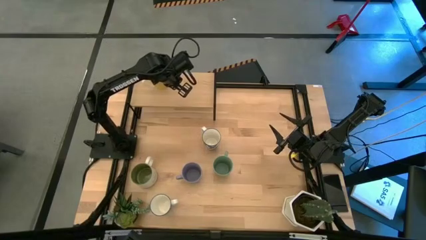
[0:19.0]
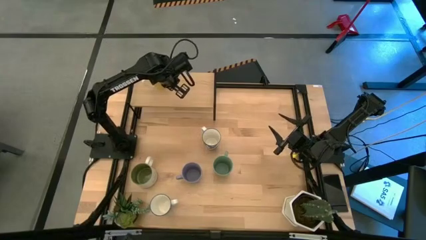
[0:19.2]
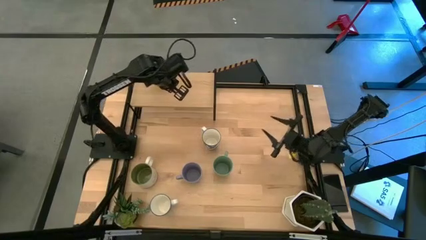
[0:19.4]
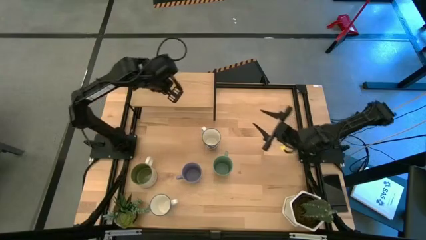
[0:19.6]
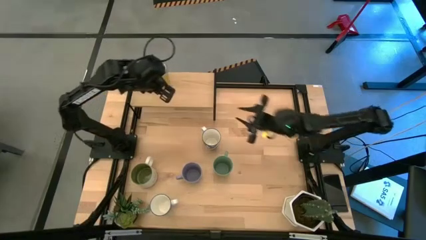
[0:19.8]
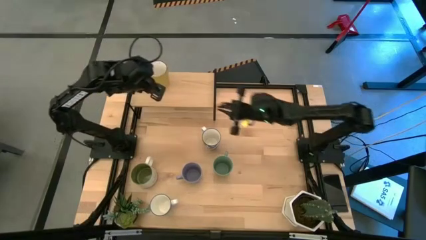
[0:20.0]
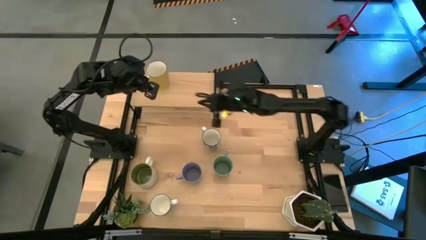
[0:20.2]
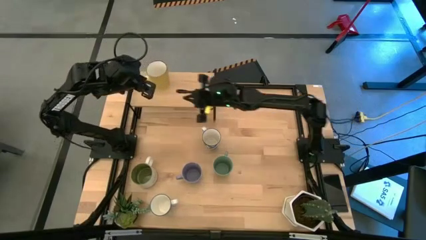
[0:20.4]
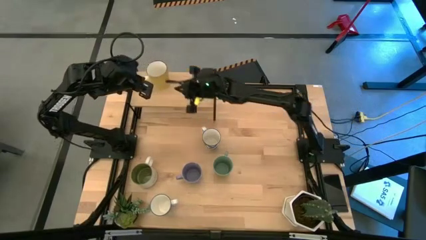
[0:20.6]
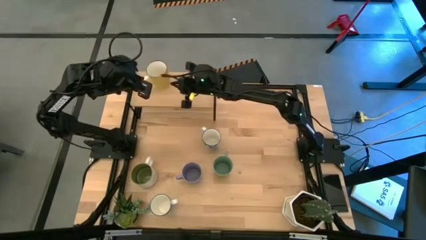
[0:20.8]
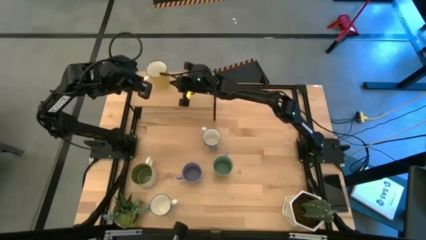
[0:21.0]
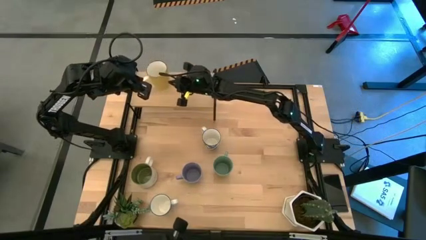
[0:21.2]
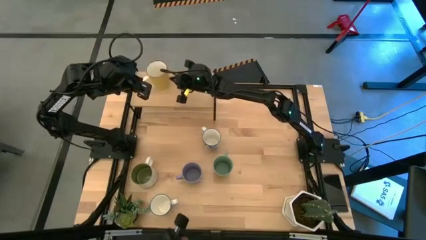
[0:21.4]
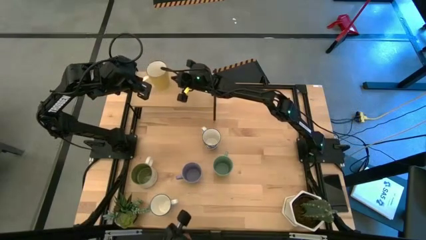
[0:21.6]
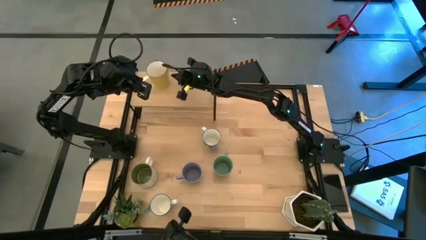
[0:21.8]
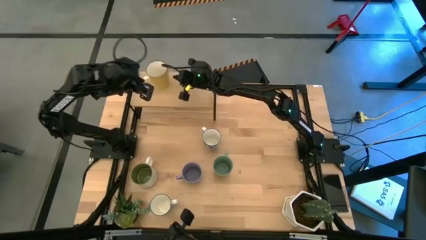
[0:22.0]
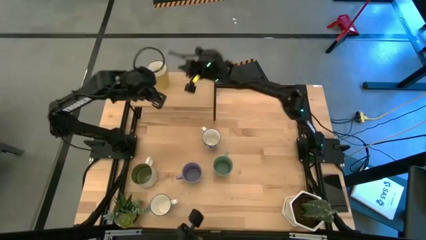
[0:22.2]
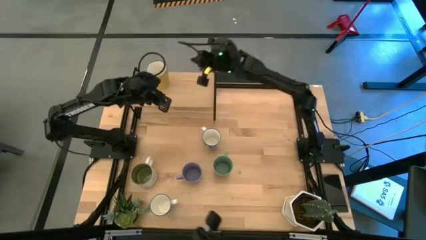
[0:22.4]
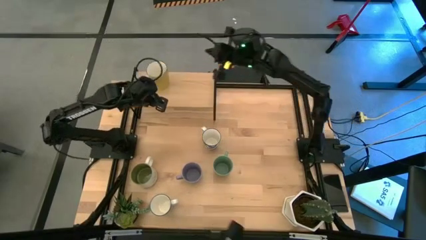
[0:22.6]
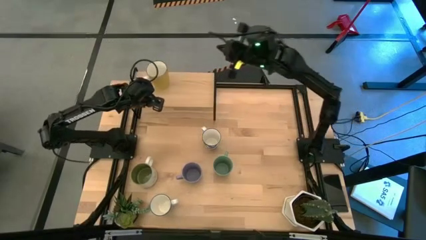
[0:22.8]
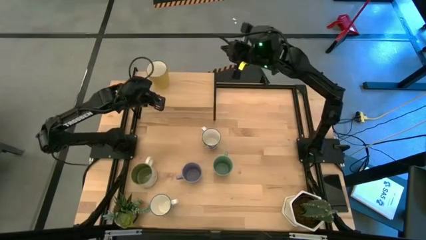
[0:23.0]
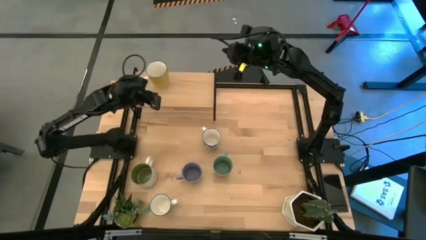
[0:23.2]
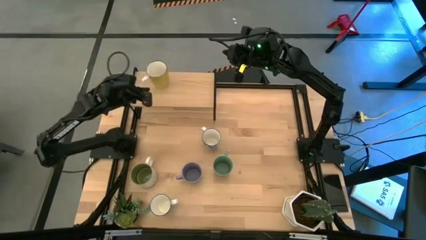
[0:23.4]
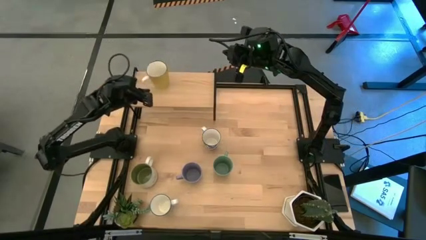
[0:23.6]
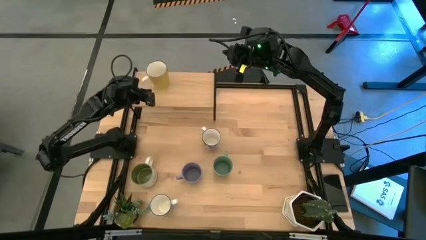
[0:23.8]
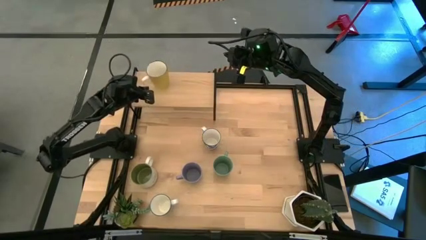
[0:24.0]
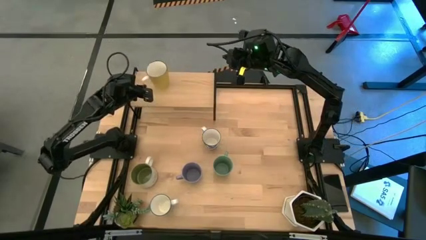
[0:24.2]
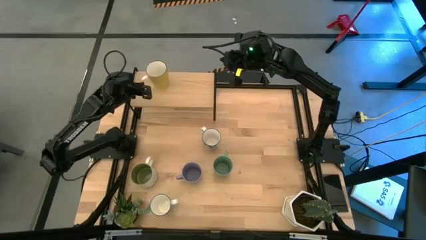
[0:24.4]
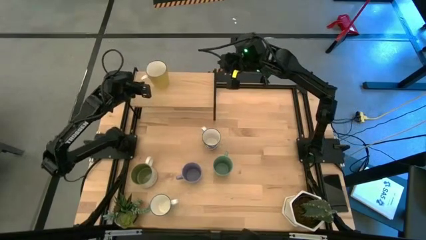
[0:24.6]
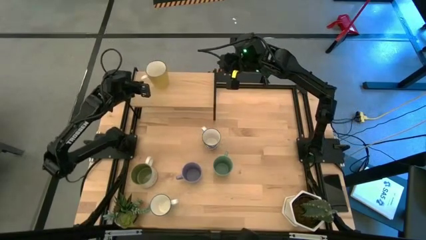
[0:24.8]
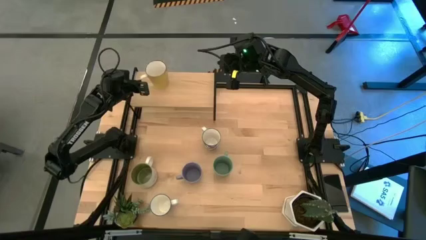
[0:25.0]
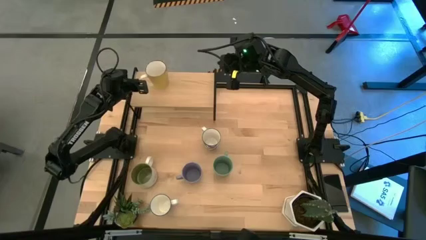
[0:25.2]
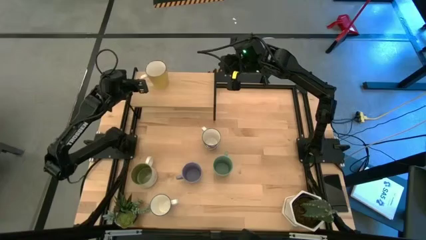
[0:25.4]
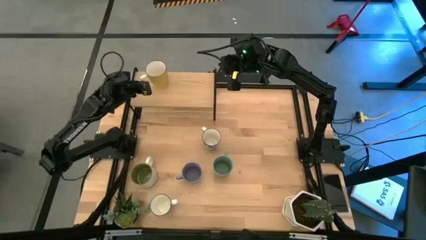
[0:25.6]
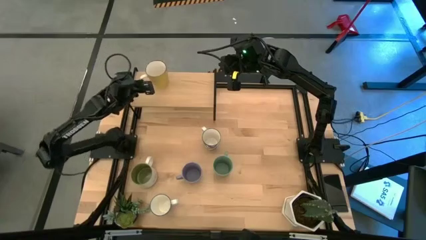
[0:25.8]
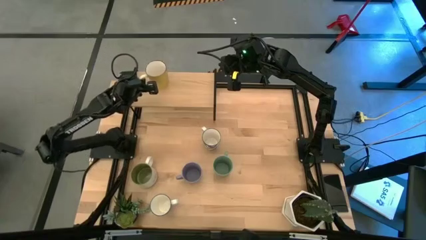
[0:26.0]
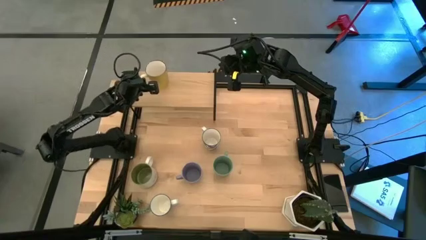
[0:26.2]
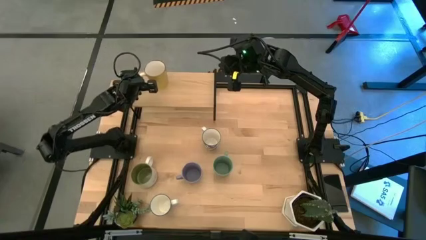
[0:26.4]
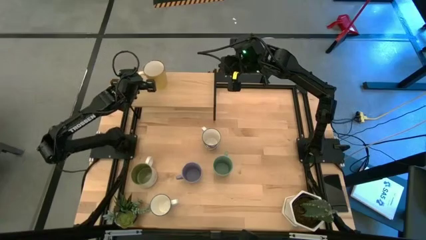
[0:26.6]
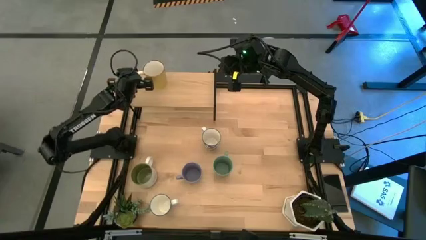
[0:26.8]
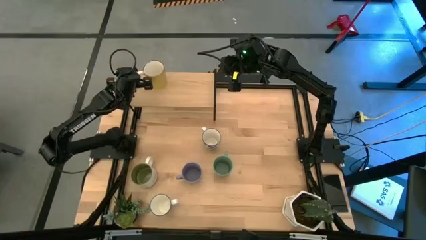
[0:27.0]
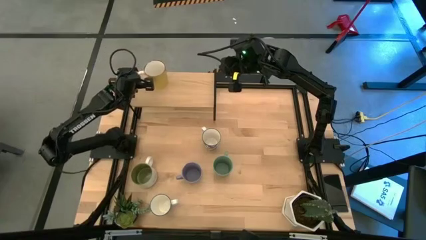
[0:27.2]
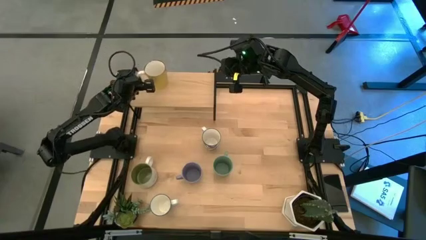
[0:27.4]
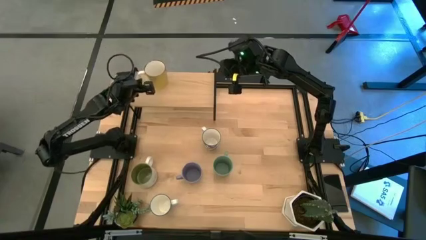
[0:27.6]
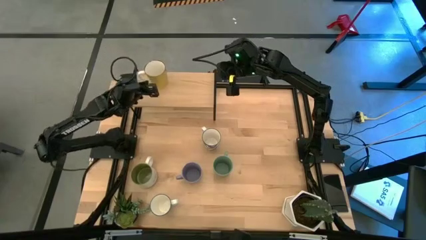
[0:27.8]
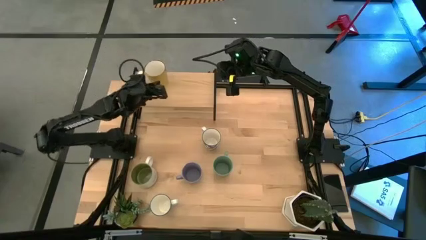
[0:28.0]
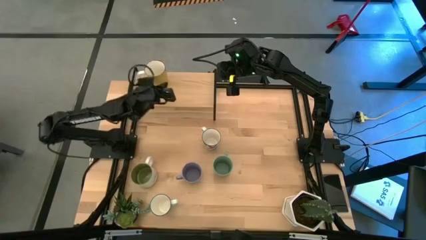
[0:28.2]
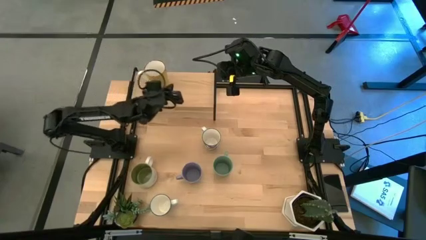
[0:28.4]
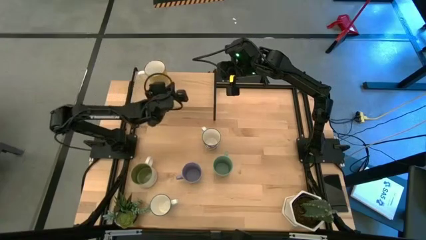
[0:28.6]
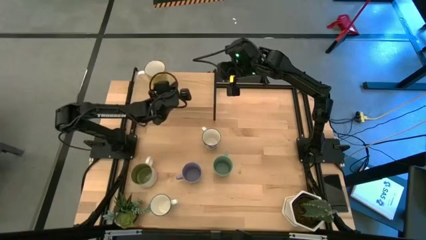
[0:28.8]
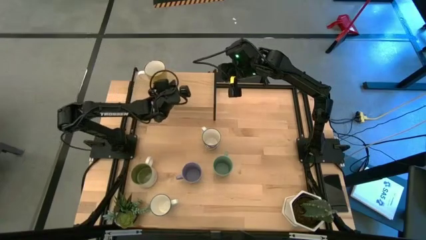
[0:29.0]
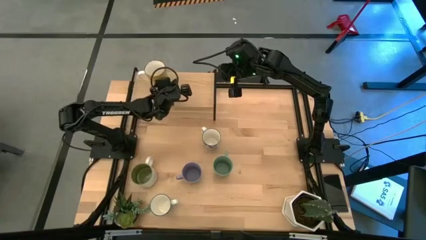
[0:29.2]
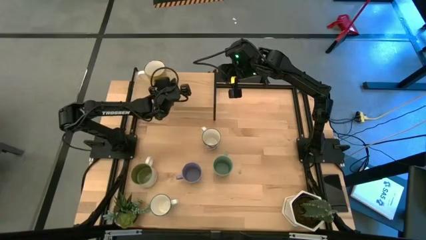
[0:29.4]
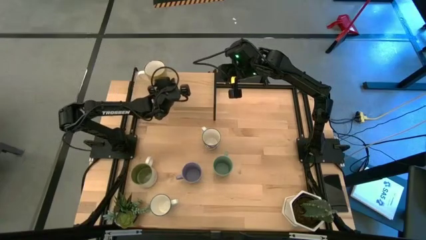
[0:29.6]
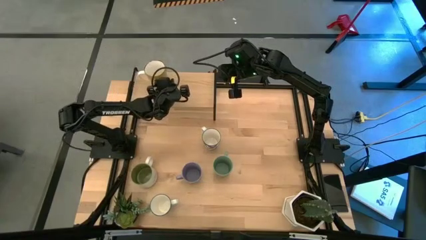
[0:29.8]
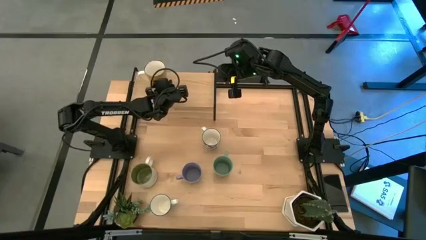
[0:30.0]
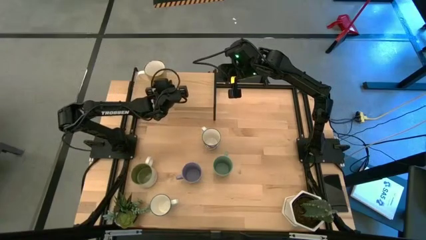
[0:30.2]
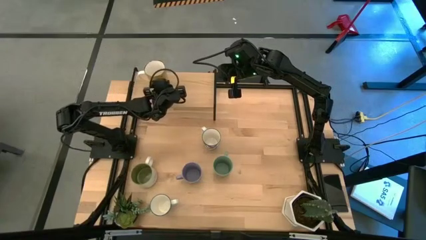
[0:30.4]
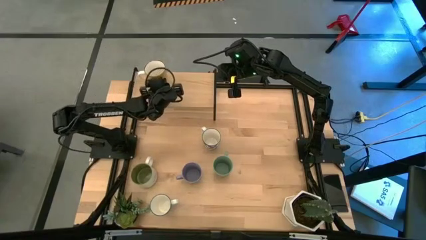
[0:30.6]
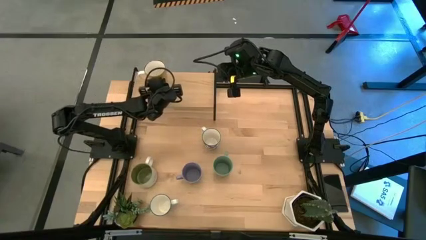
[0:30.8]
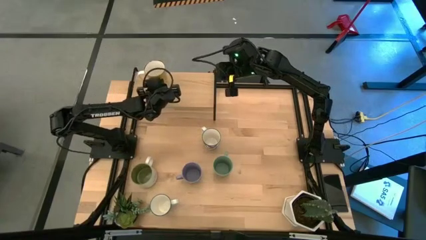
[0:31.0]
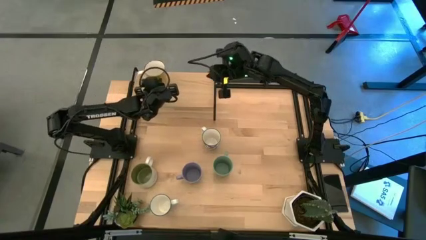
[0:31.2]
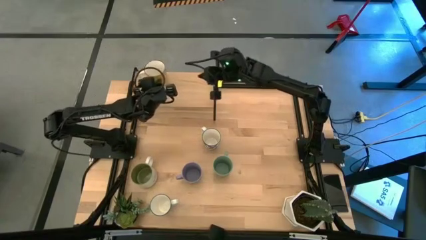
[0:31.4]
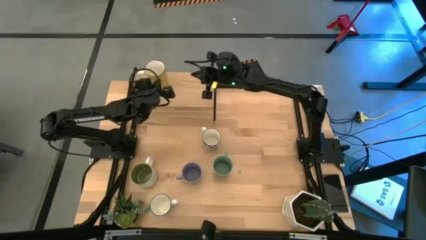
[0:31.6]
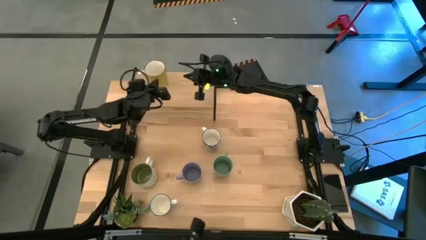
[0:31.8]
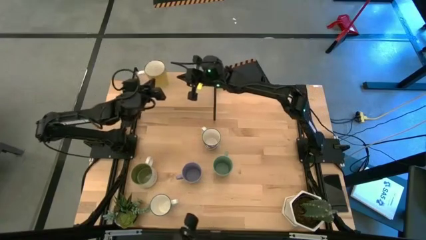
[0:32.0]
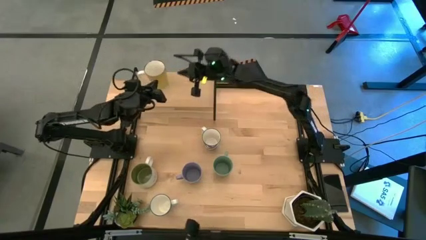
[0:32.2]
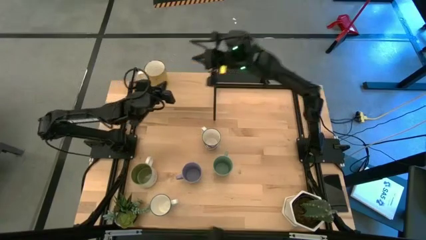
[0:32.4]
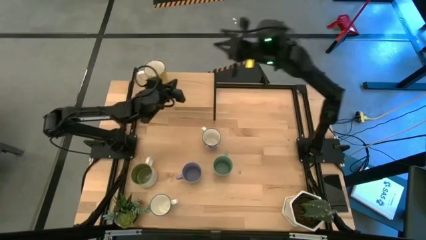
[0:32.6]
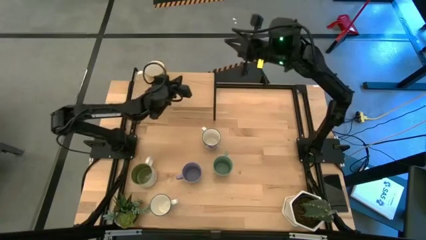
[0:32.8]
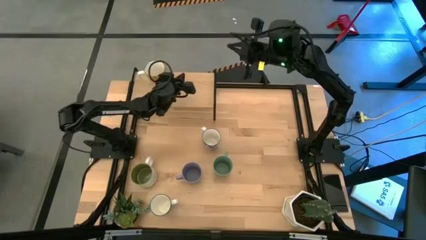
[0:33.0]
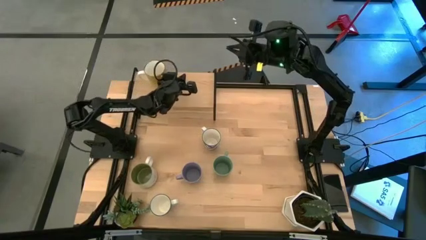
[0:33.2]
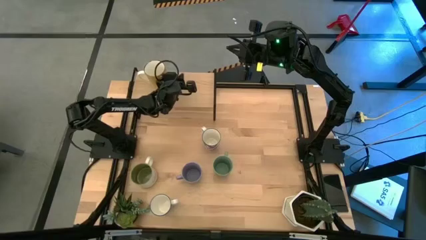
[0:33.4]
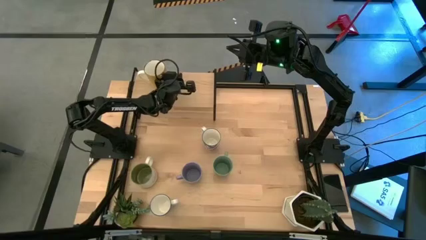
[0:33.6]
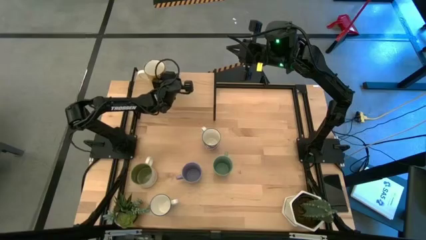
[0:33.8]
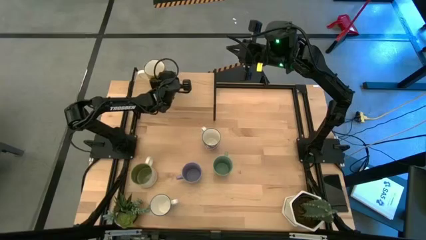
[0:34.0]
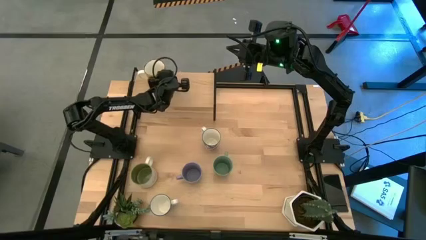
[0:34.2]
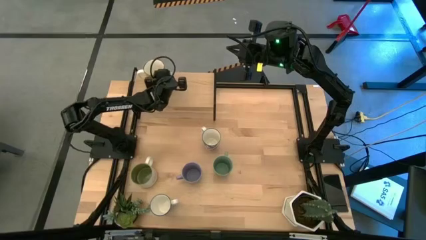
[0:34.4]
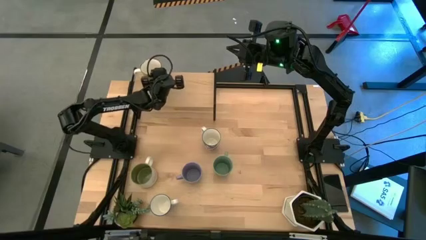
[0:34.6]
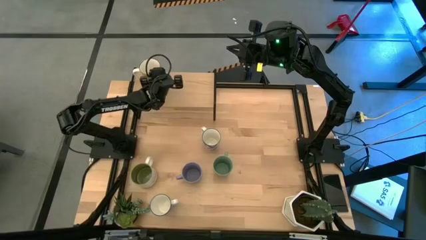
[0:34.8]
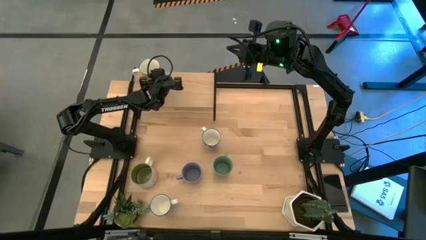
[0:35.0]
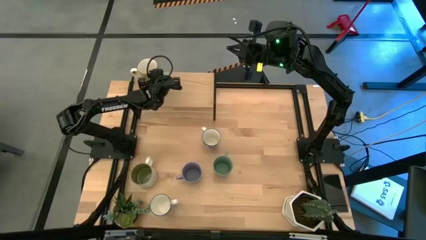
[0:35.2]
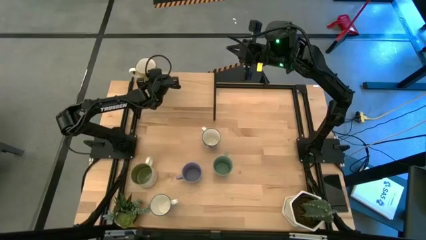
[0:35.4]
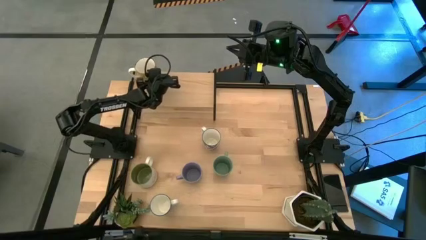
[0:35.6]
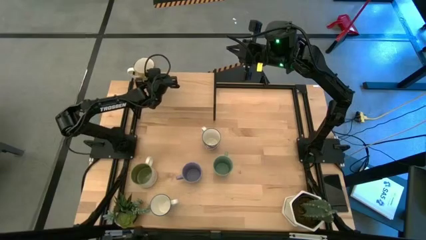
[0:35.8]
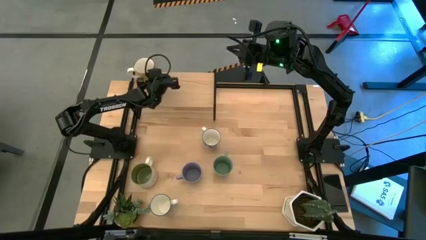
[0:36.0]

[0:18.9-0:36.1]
Task: Place coffee mugs
Put the yellow cup on the shelf
